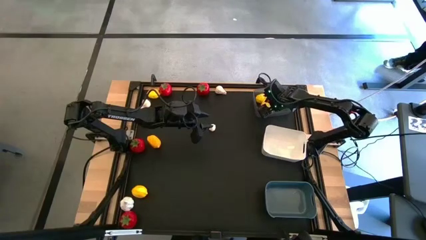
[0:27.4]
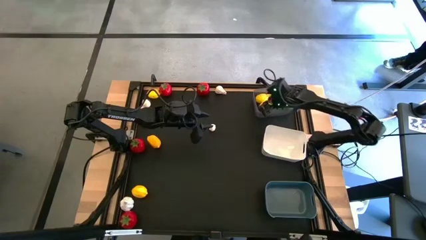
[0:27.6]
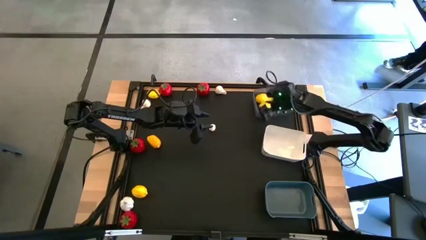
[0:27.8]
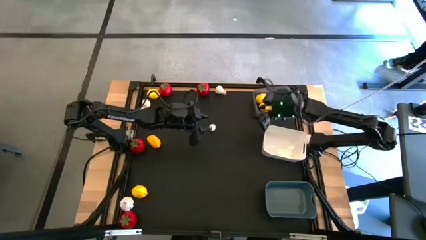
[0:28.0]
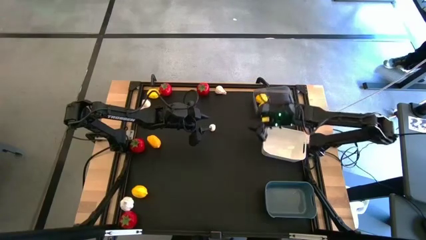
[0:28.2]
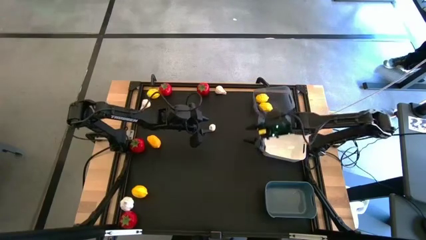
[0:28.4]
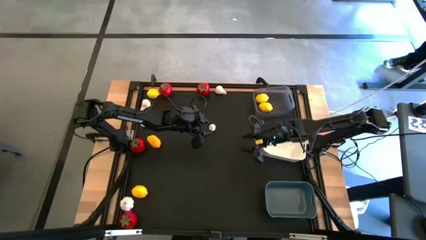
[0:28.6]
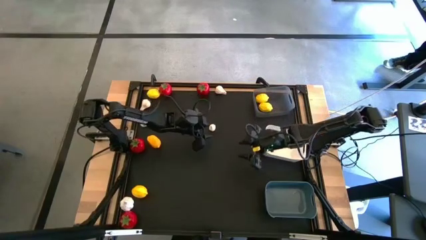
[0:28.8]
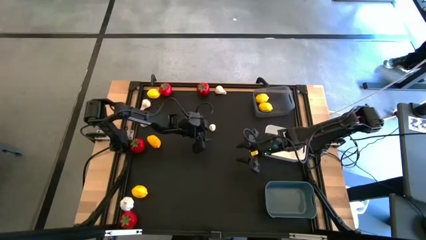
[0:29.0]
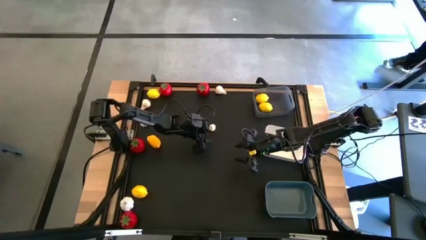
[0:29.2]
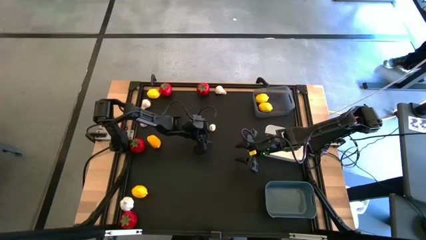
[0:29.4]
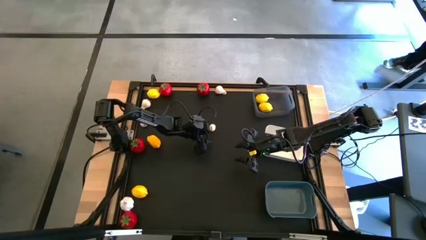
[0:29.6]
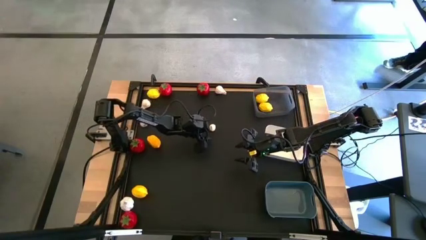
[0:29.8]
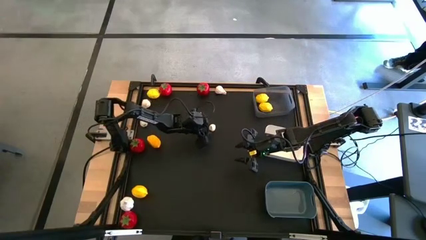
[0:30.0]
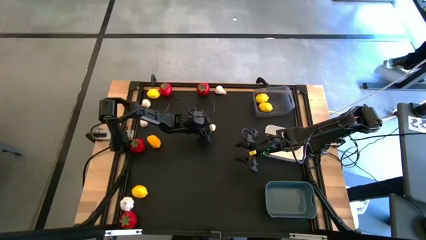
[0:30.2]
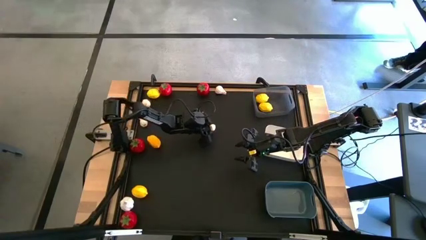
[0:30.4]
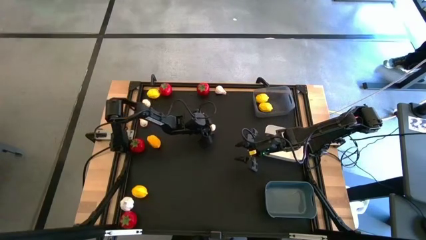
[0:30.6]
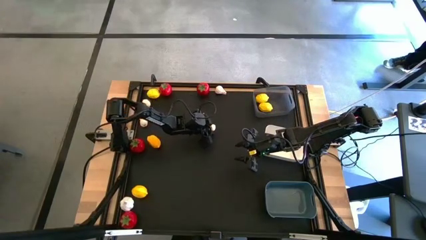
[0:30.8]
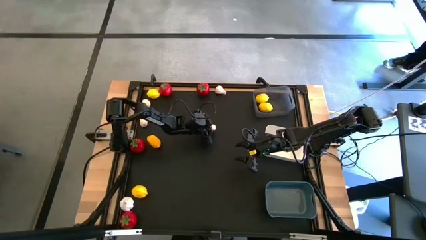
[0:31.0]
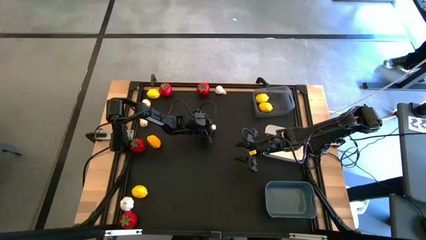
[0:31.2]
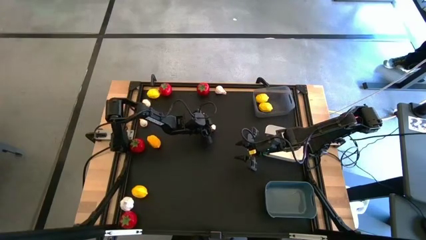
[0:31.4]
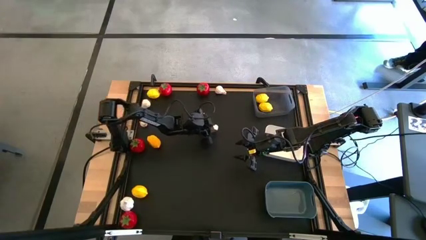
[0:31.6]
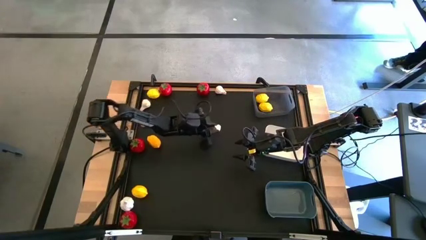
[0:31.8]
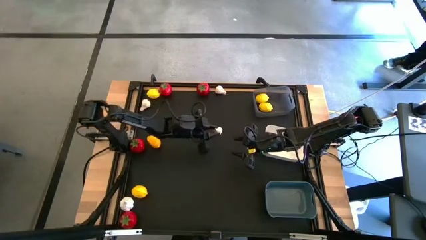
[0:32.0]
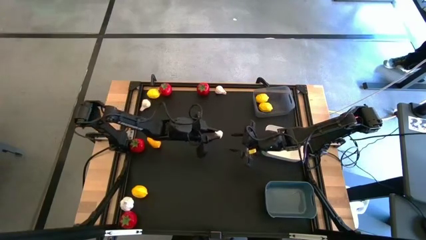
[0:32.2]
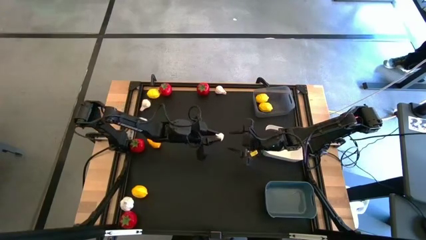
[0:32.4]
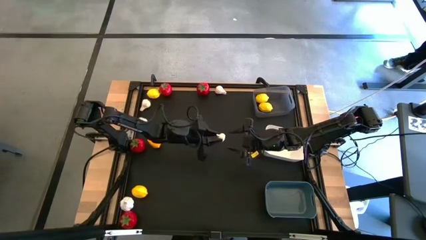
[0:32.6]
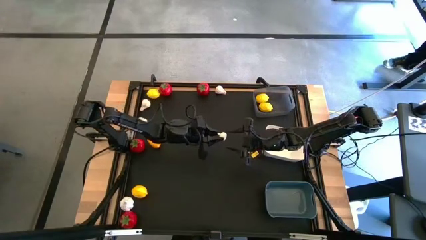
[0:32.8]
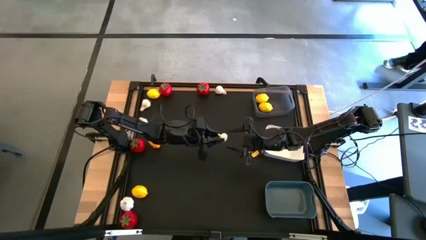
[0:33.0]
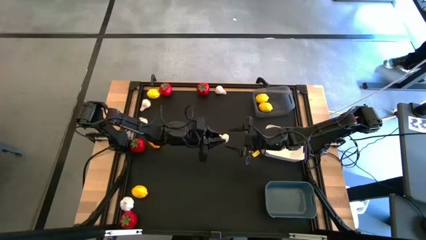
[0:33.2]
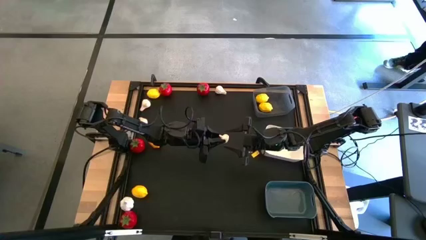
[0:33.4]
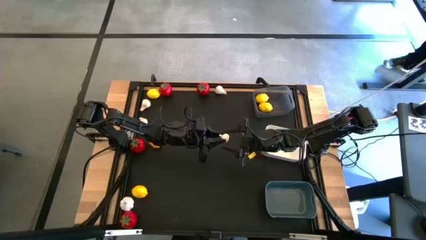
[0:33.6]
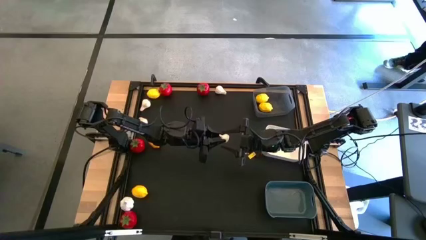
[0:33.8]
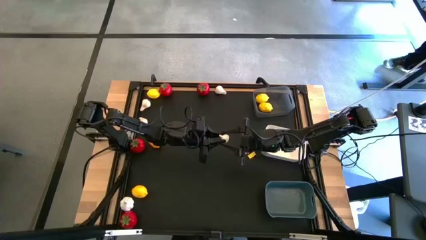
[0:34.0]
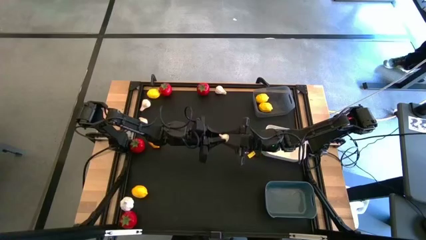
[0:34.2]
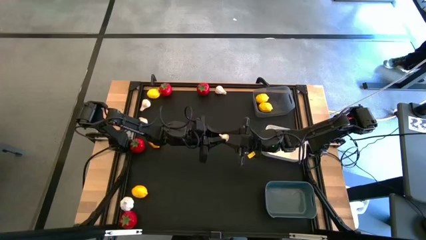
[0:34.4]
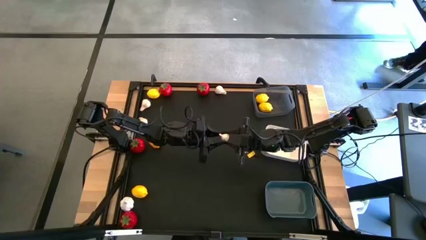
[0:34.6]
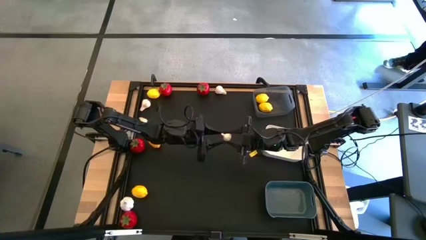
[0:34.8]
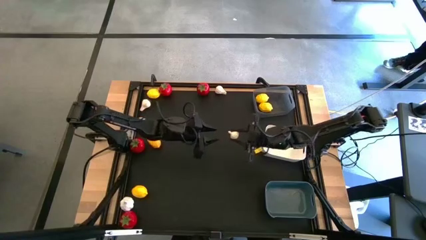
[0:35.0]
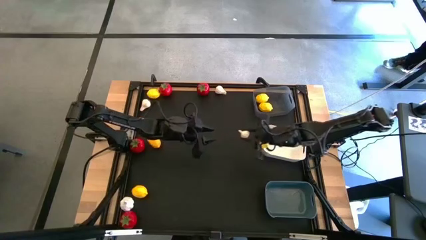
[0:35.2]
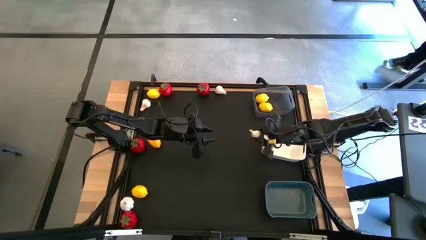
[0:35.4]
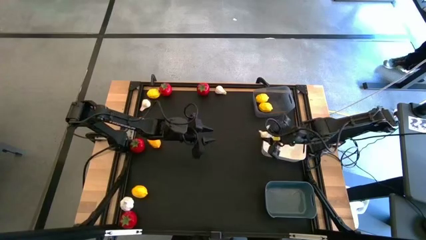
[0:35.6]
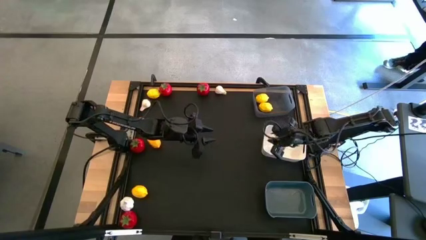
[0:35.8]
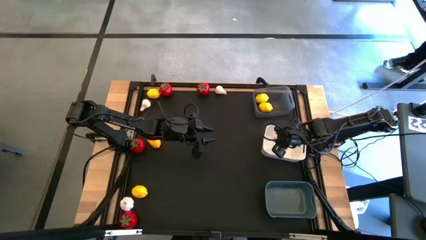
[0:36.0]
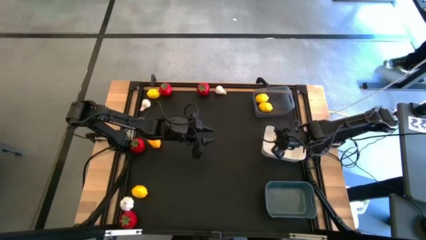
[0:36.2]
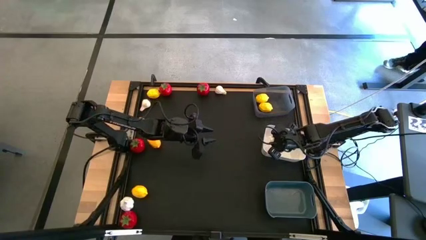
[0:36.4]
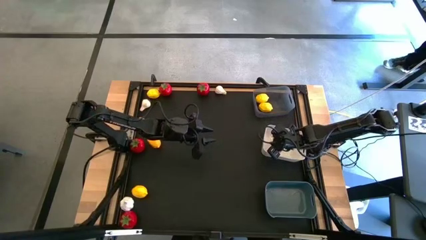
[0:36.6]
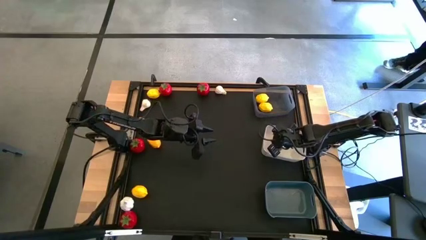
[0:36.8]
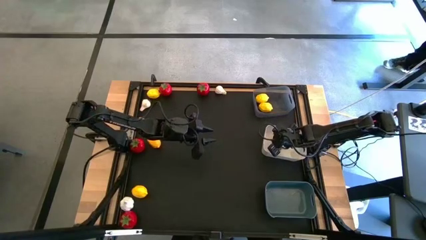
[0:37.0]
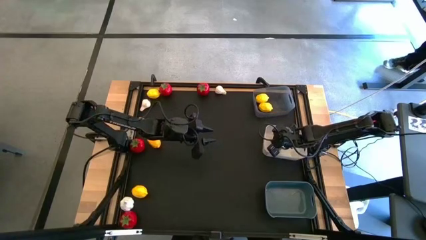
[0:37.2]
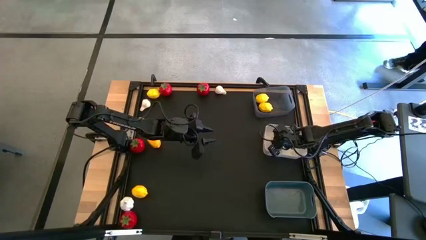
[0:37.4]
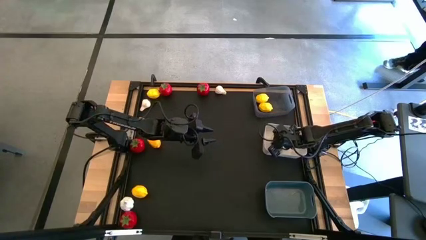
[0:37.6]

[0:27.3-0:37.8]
Task: Sort produce into baskets
Put the garlic into the white bin

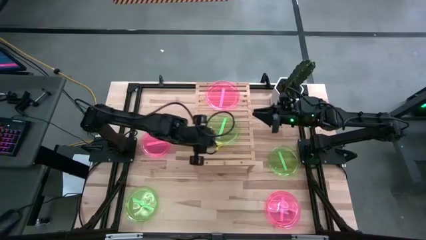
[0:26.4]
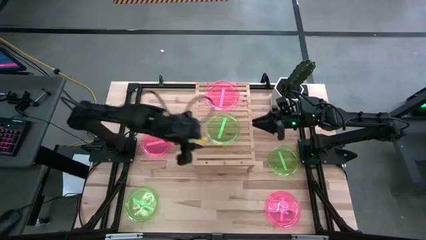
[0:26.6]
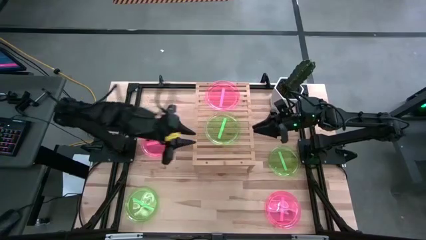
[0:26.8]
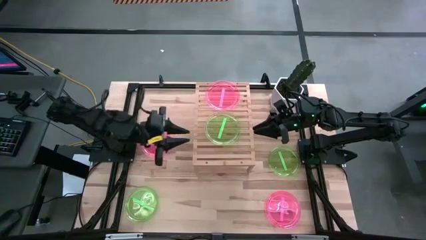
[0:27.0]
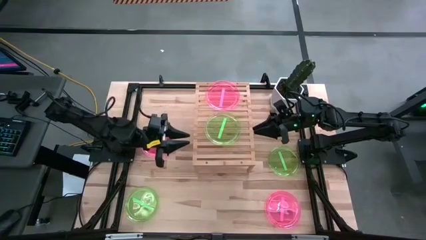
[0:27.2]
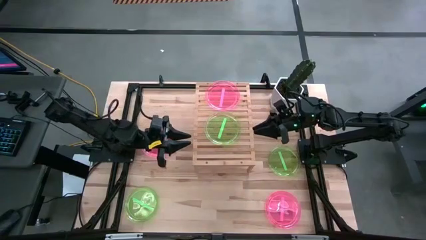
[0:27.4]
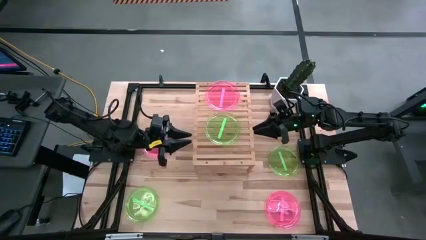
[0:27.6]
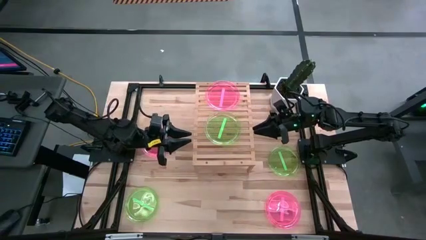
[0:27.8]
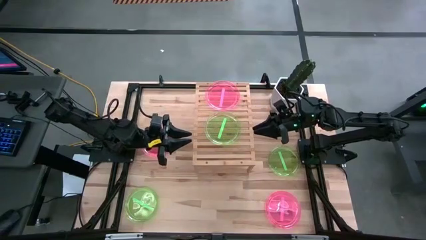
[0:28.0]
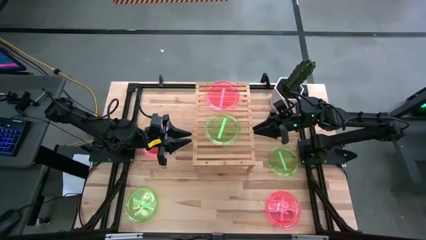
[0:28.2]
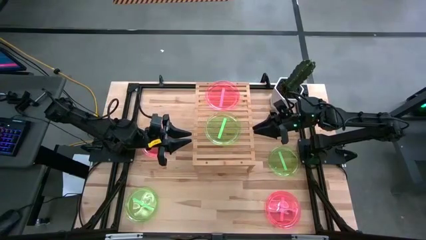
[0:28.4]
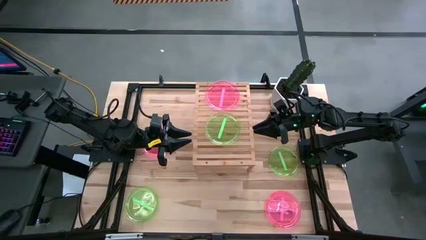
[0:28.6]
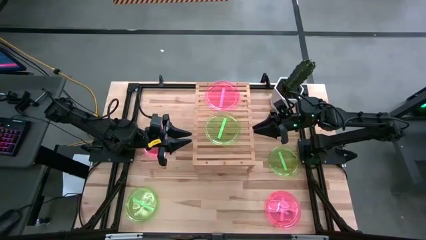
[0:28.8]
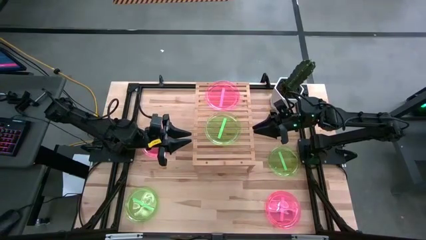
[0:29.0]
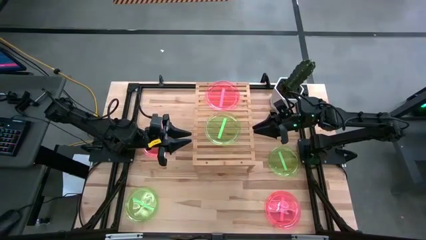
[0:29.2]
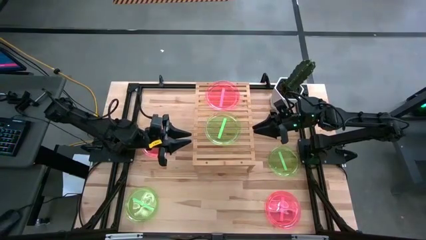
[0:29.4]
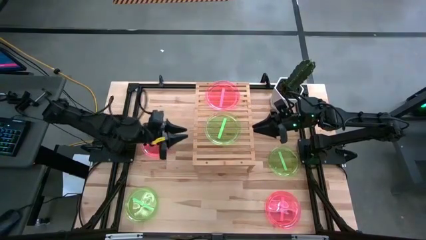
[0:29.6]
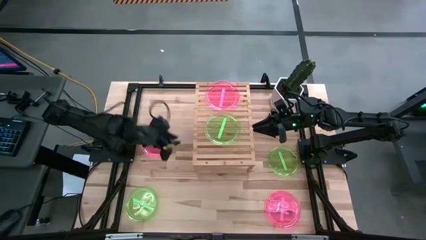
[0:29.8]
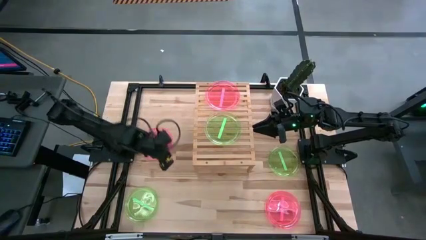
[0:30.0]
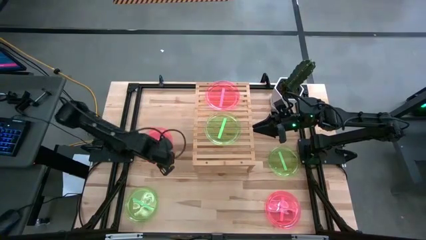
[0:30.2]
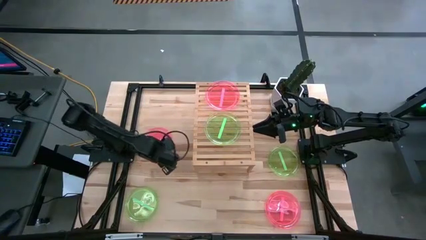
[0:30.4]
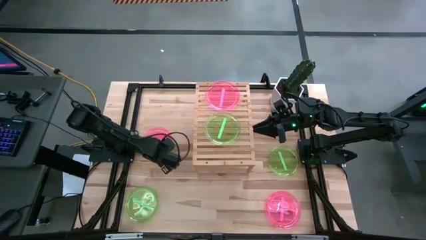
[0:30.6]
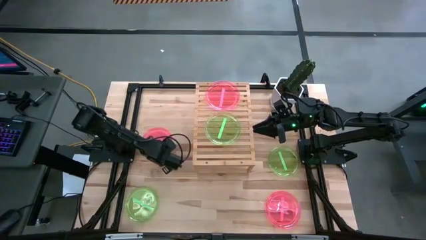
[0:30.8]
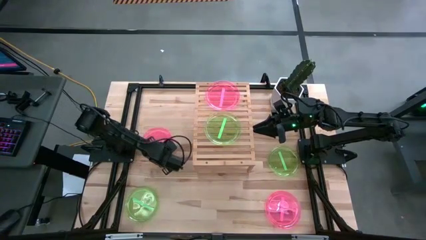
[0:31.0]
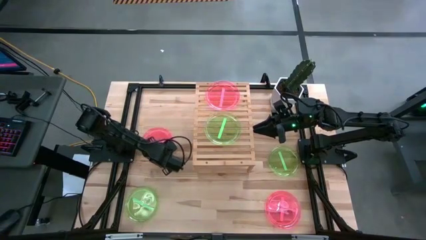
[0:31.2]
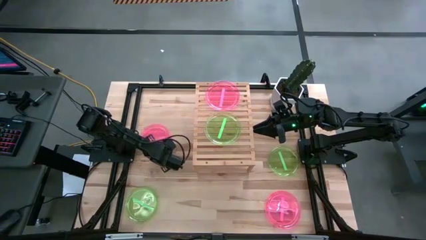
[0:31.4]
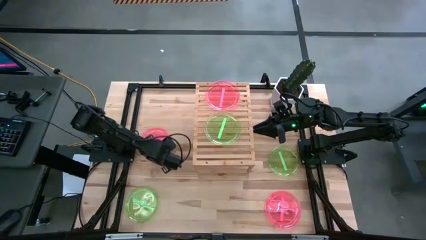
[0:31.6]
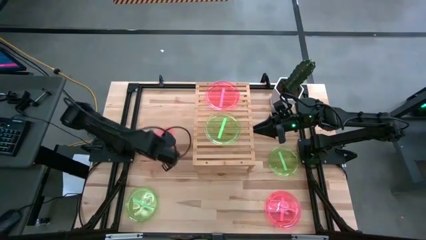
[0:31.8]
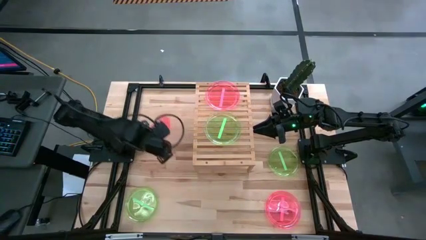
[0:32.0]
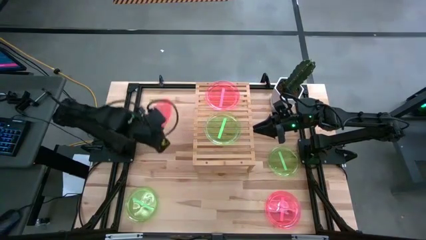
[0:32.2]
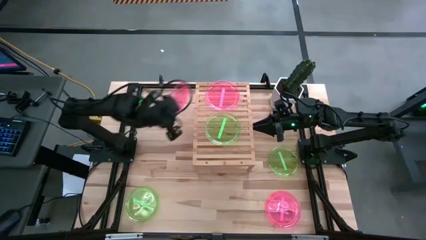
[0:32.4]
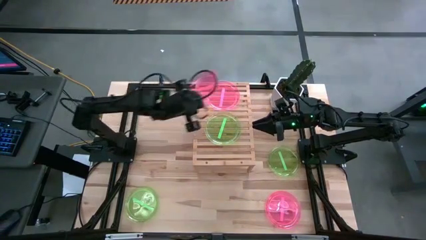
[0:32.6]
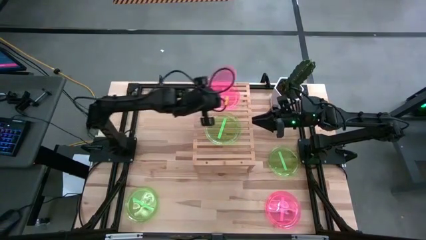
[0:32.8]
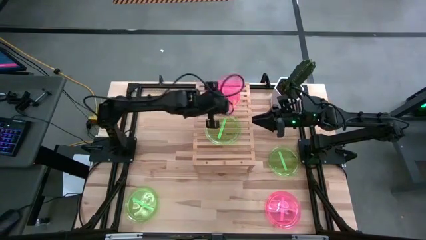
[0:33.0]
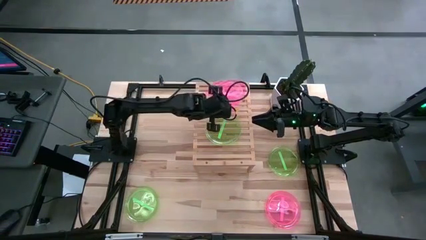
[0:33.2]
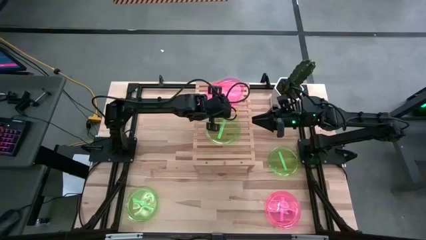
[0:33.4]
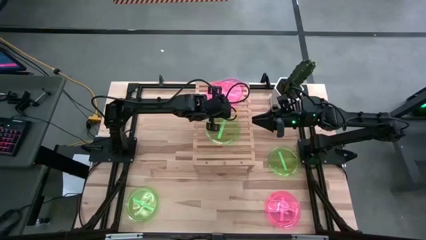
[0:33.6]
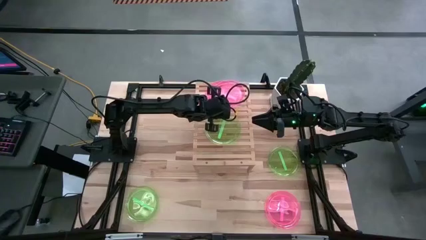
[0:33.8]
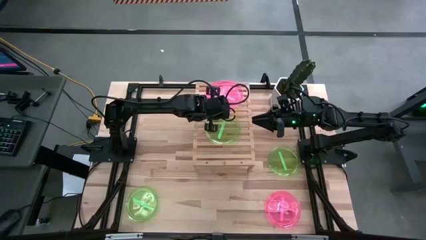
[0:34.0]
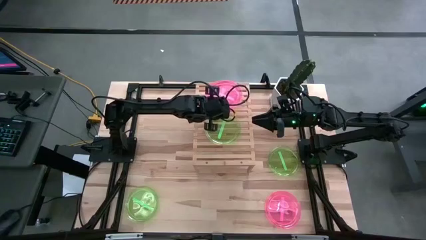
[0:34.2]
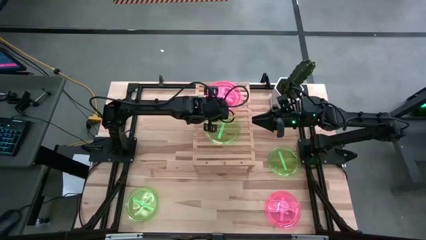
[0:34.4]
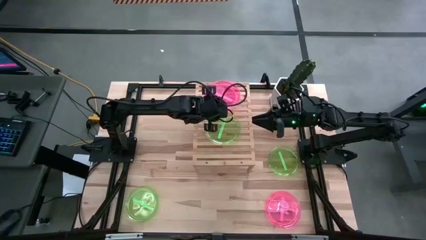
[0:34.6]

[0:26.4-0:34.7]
Task: Place and stack plates onto a shelf
Stack the top pink transparent plate on top of the other pink transparent plate on the shelf
